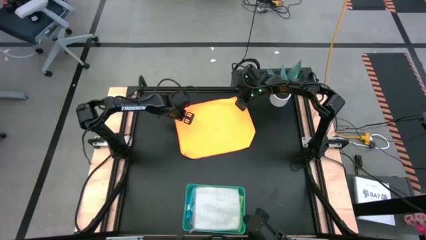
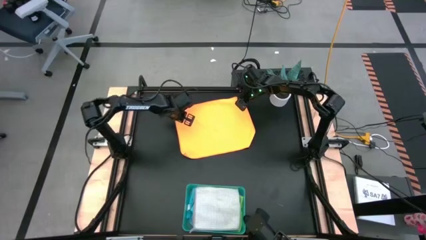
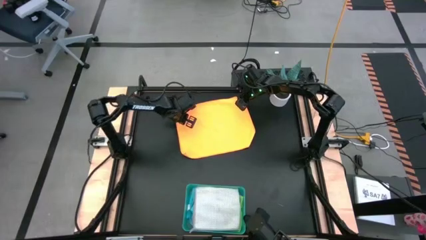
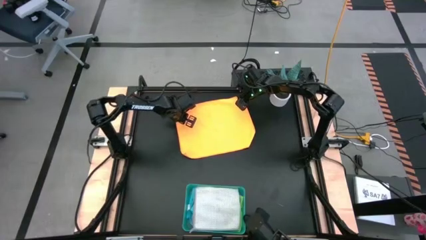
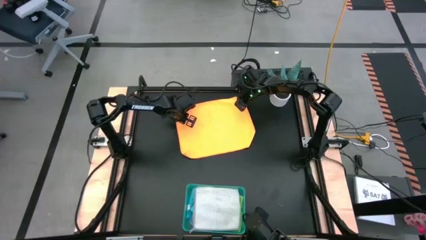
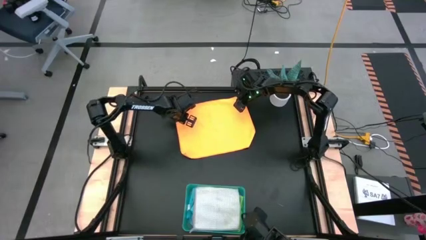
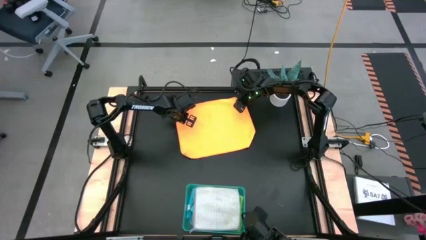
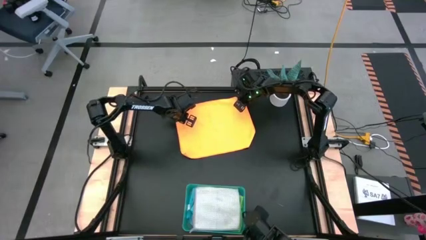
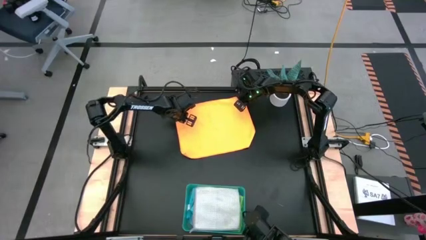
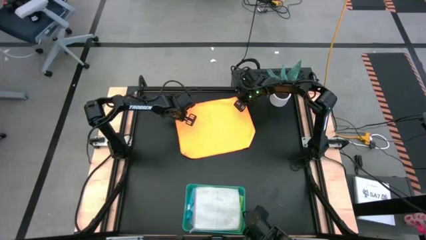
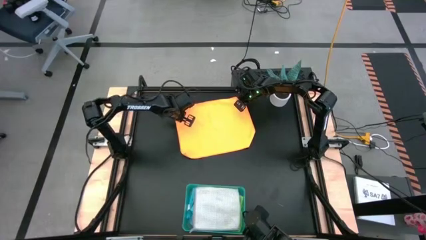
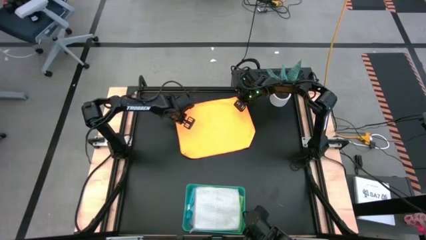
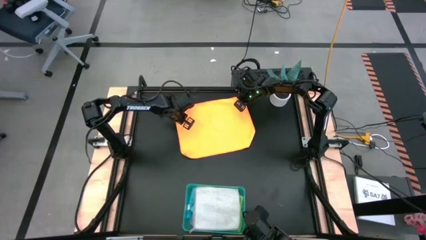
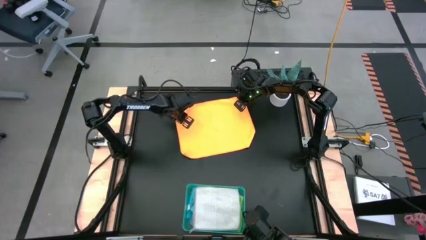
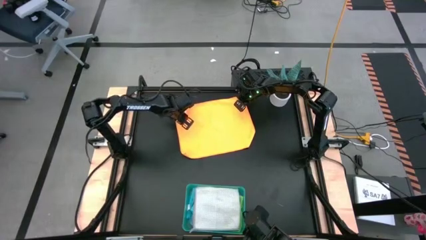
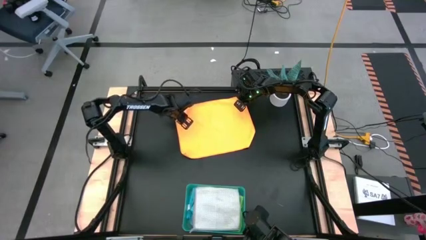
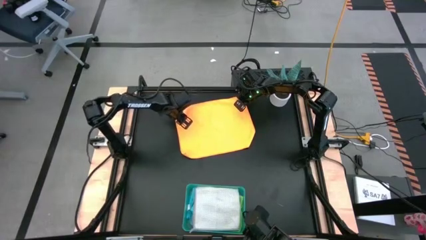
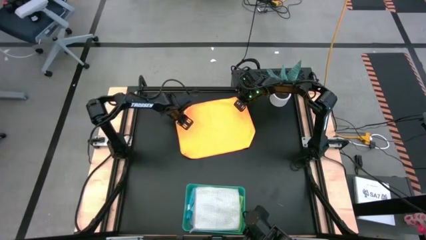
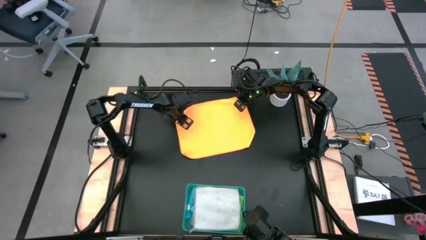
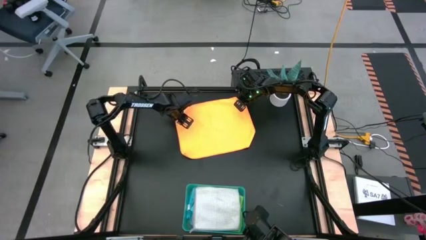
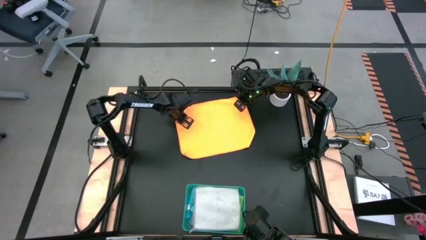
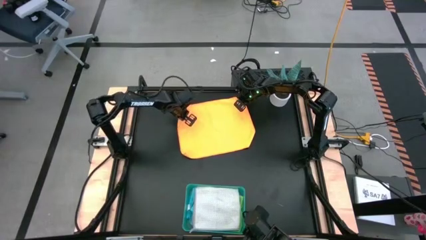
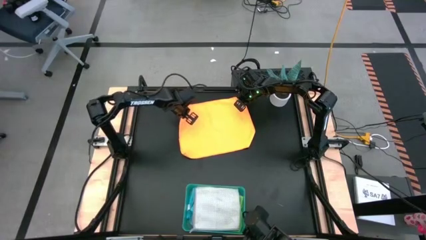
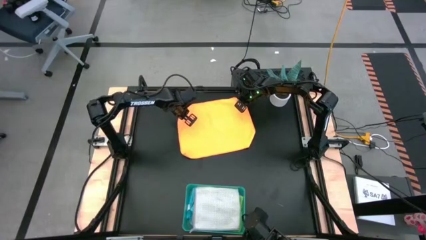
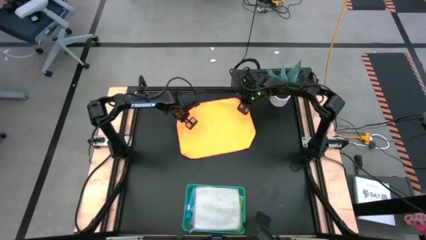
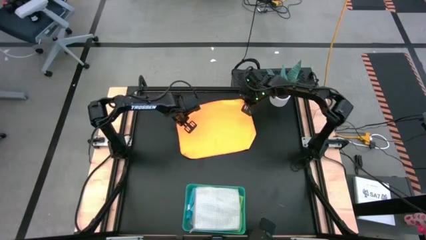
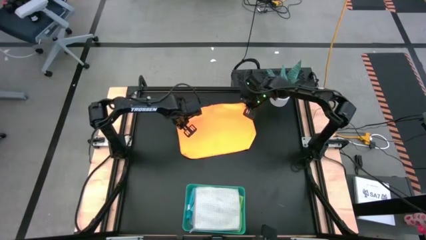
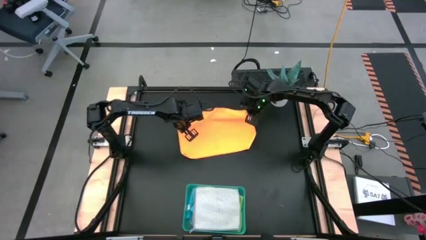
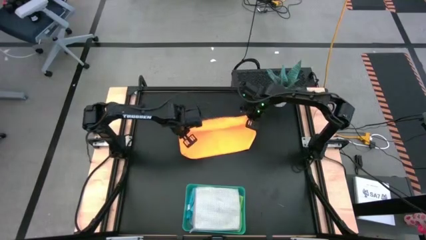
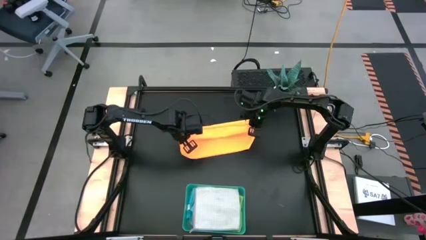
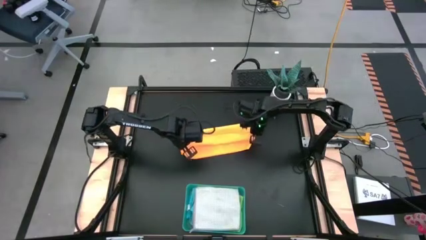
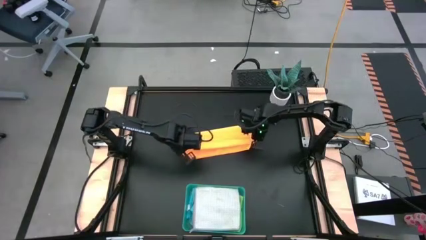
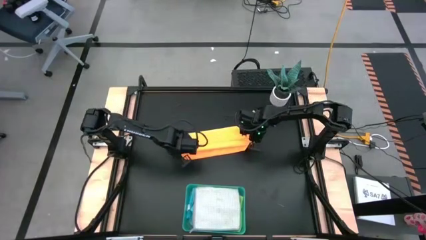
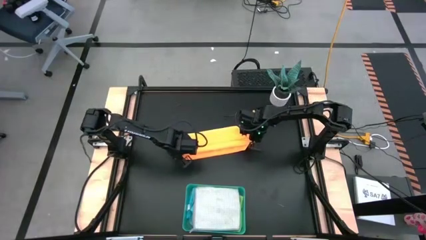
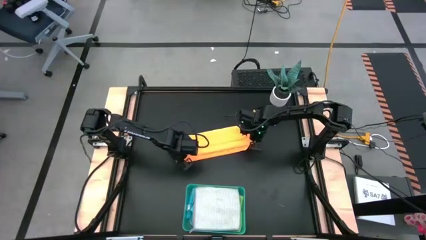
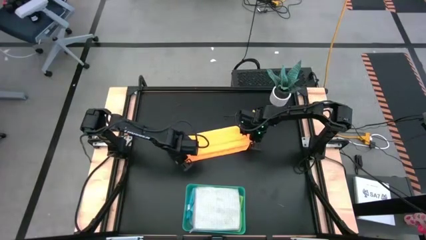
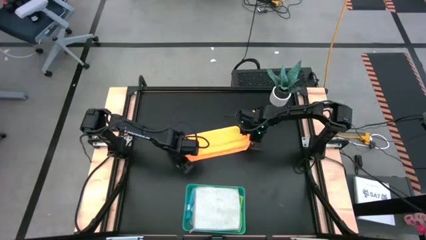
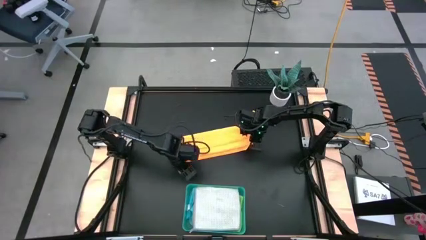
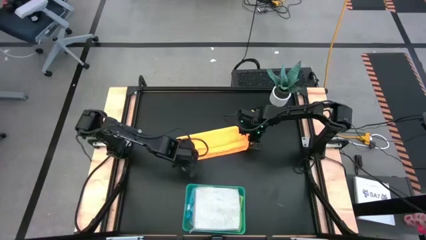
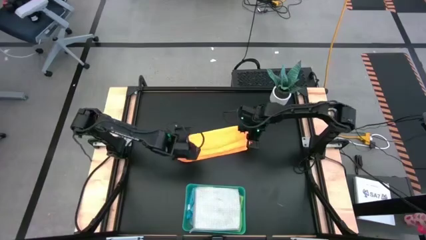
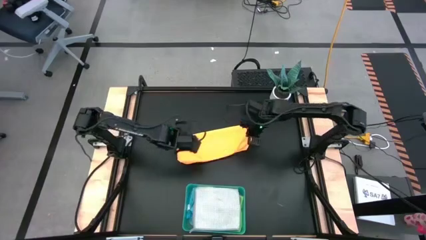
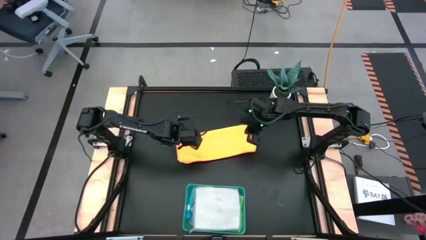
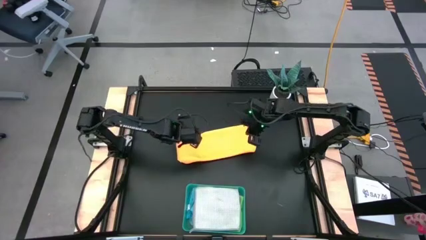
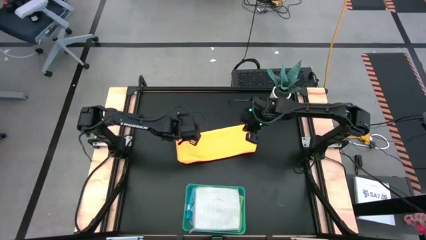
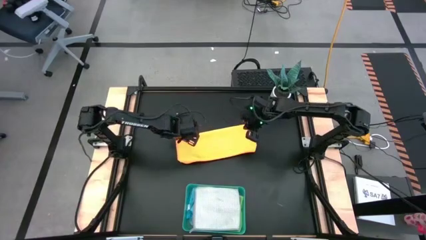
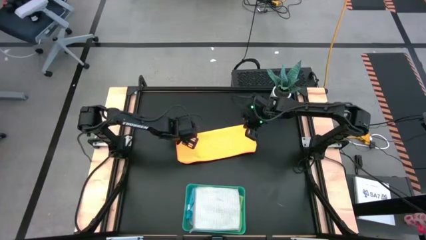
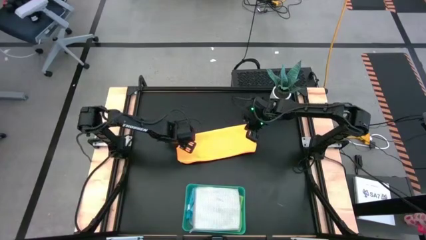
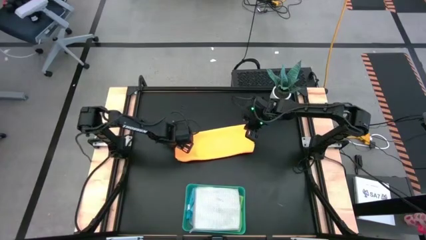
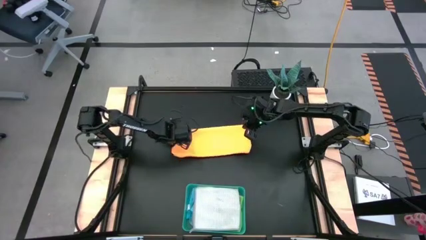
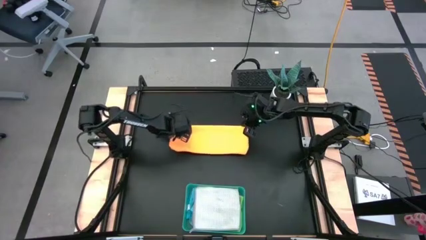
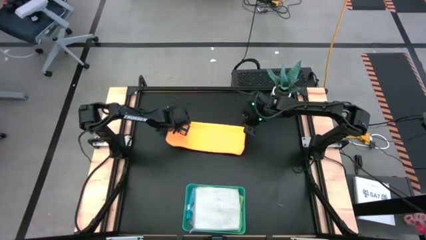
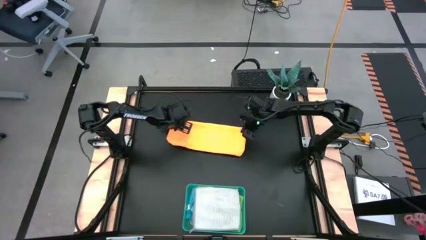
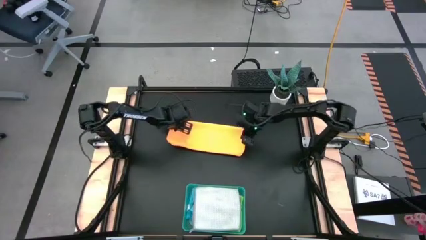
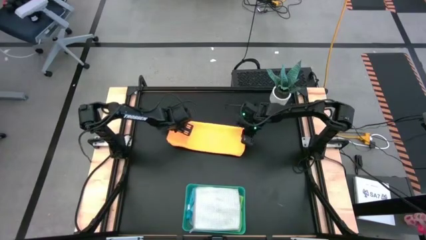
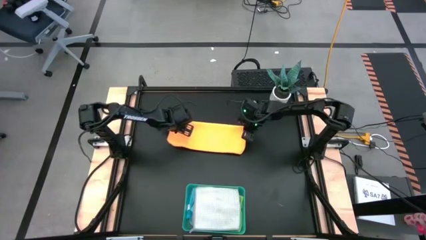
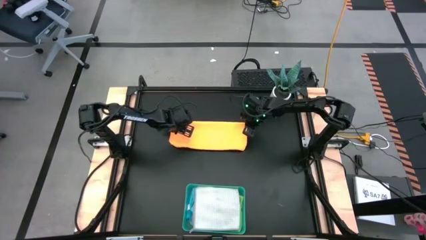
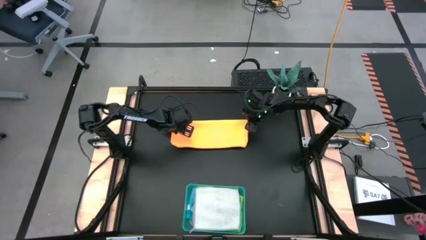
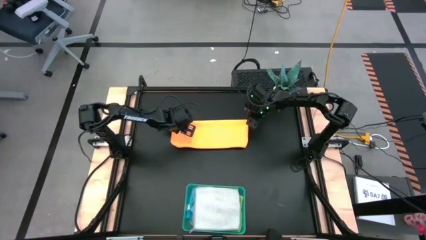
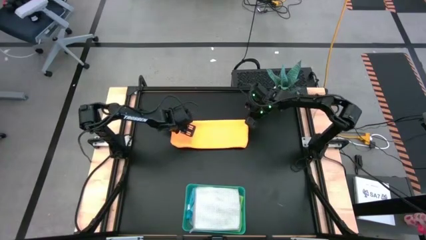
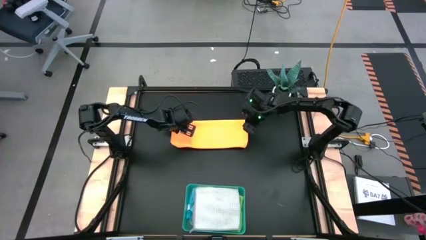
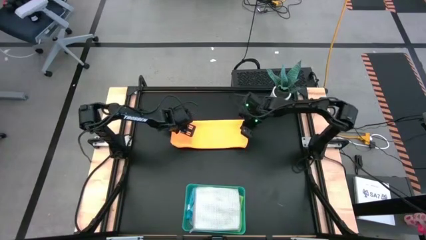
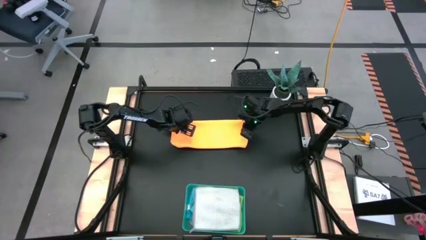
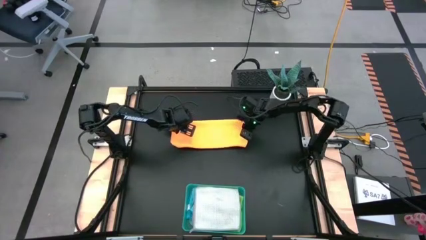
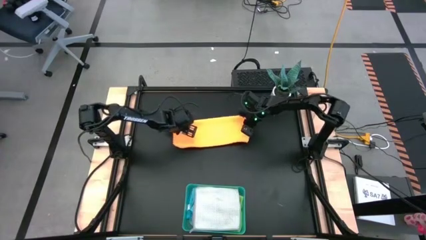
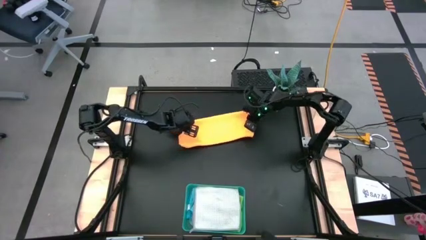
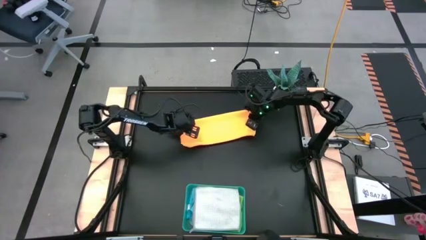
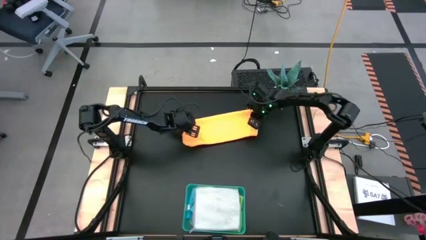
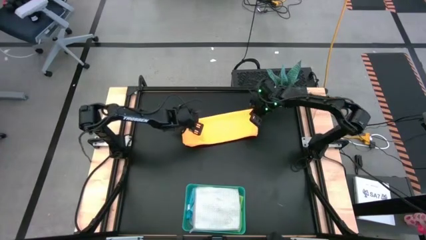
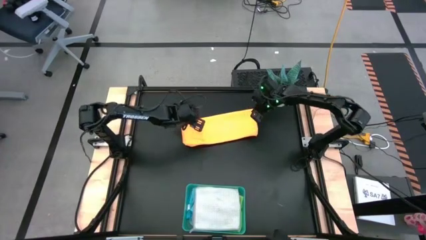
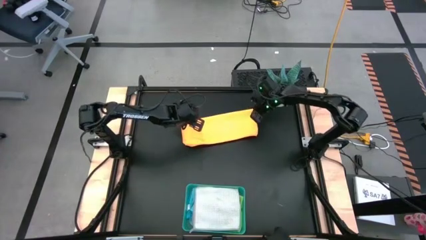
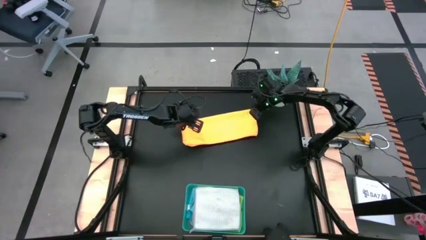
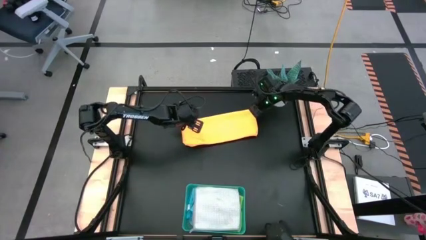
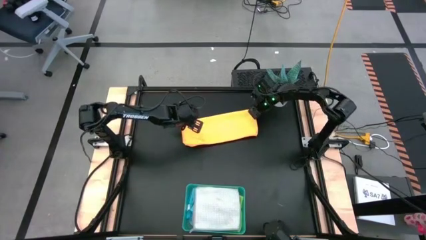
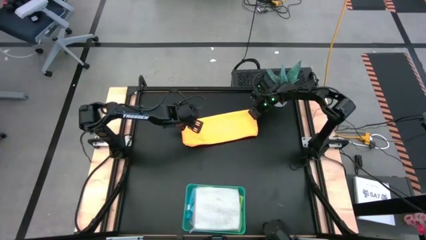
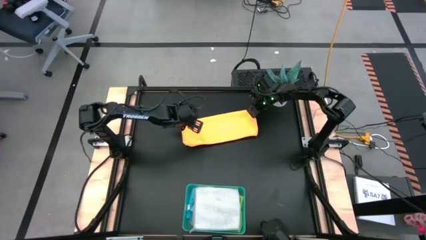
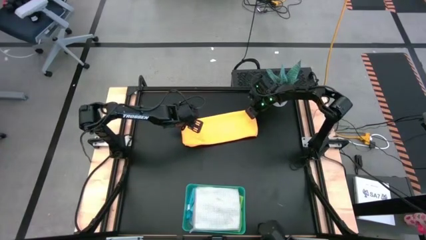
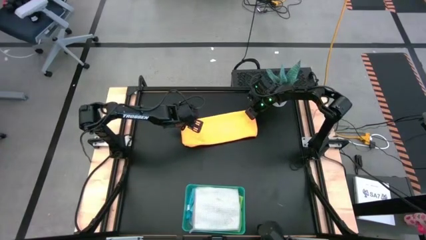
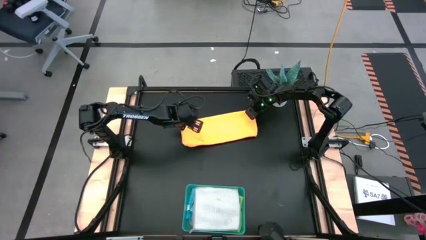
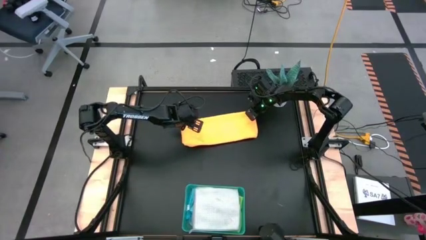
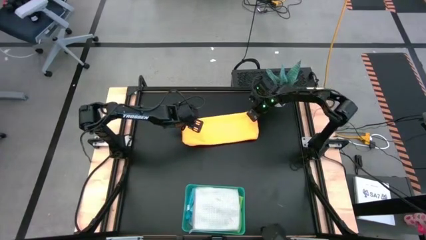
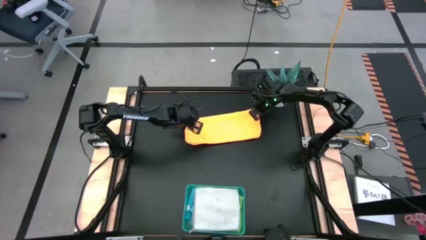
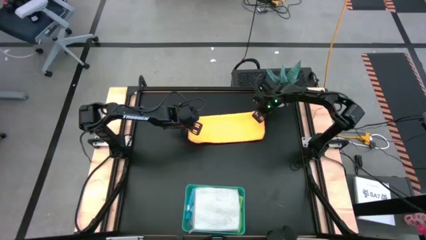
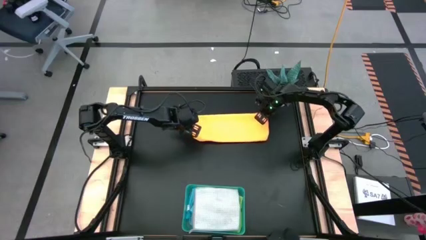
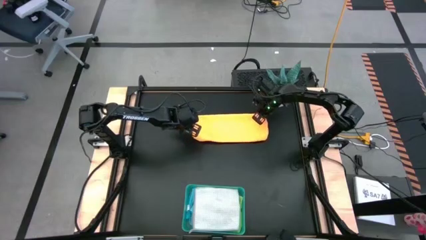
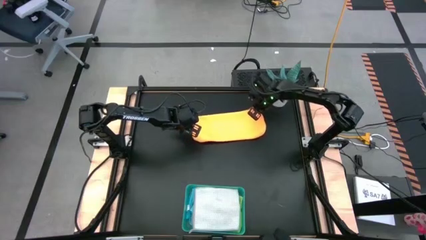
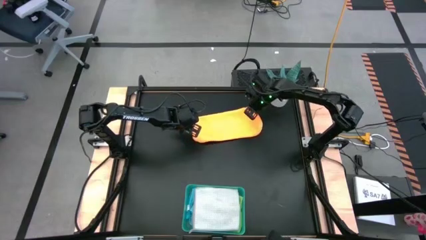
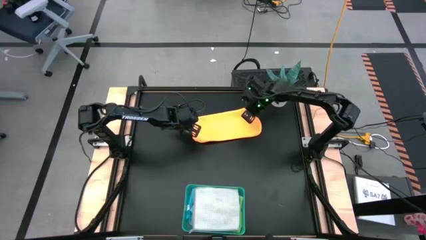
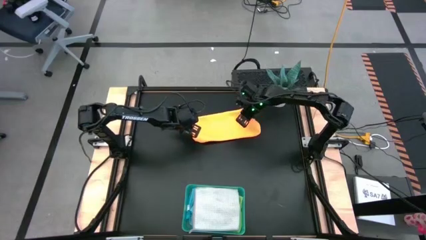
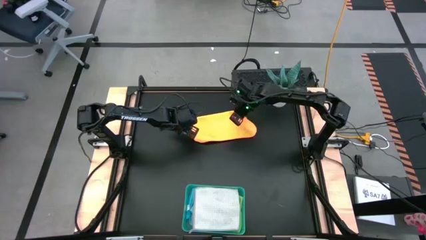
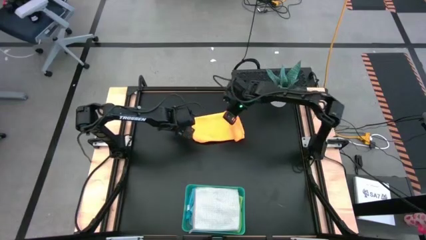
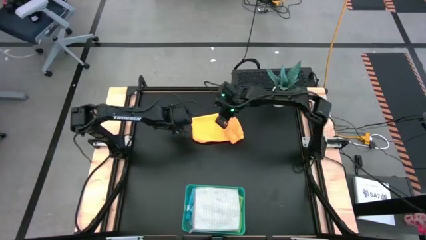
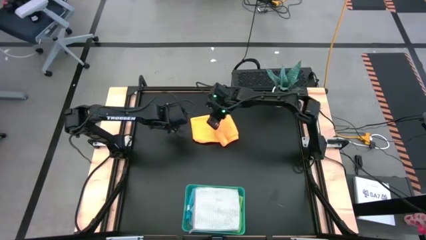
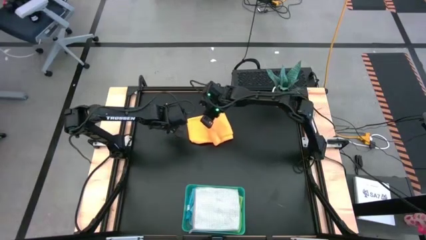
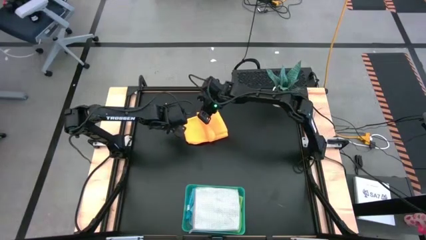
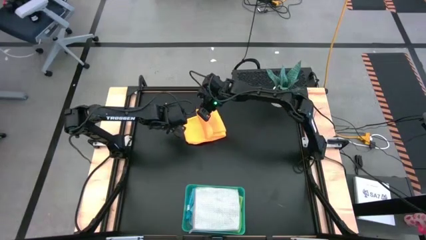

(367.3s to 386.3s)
Task: Fold microfiber towels
Fold the orange microfiber cloth
